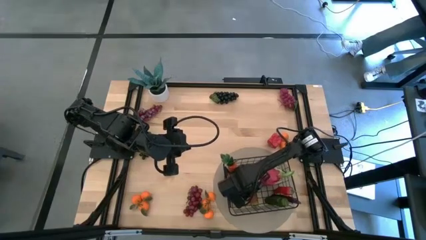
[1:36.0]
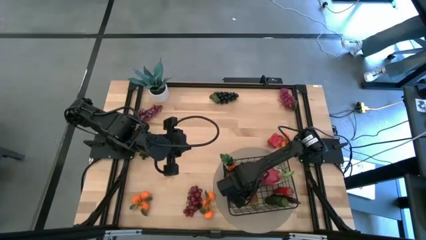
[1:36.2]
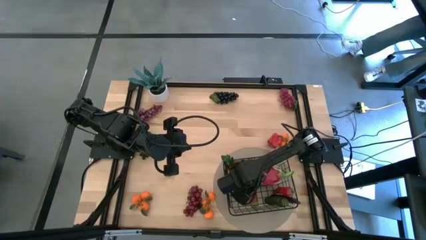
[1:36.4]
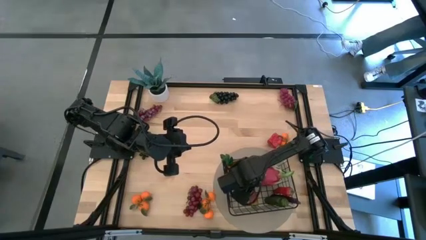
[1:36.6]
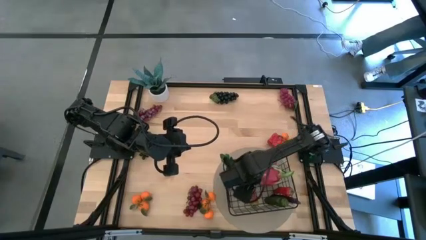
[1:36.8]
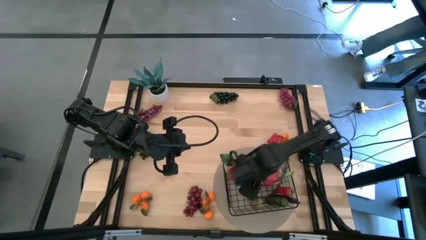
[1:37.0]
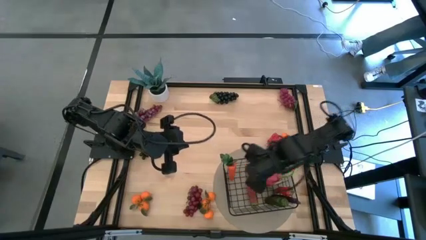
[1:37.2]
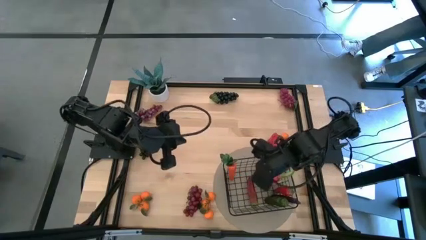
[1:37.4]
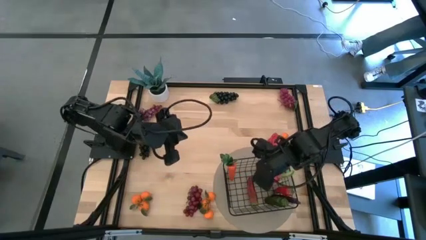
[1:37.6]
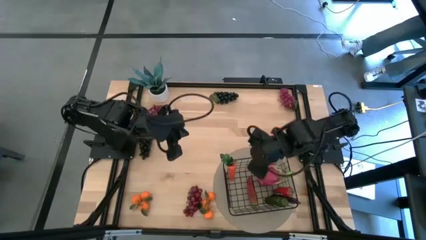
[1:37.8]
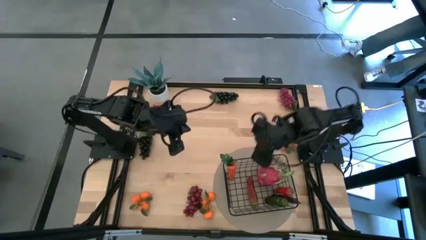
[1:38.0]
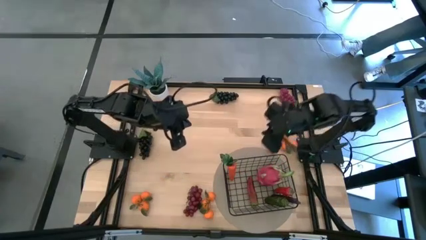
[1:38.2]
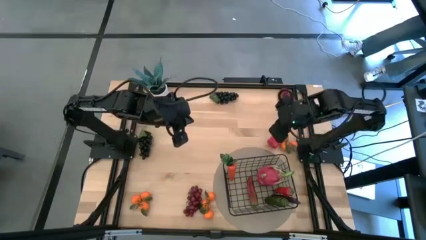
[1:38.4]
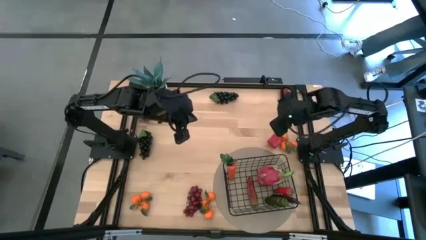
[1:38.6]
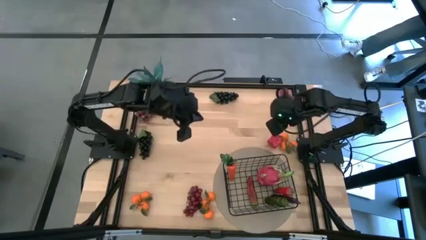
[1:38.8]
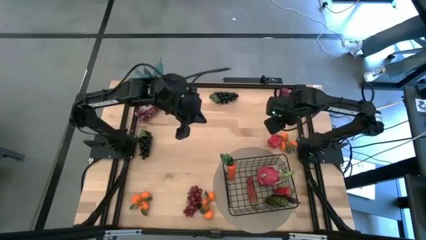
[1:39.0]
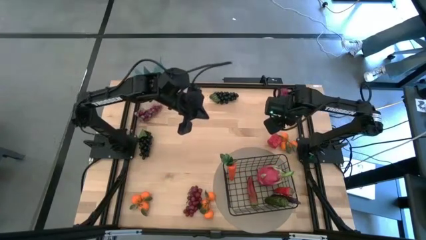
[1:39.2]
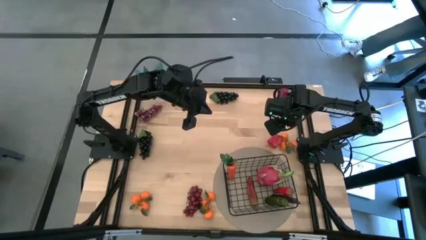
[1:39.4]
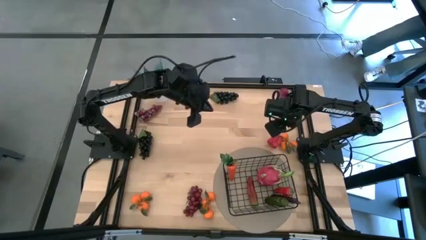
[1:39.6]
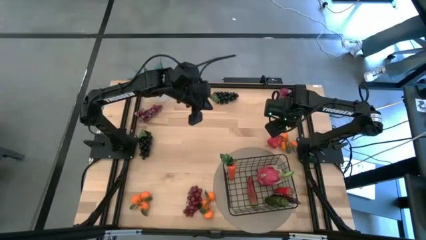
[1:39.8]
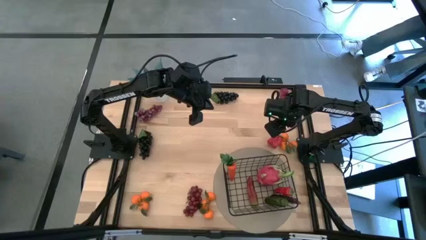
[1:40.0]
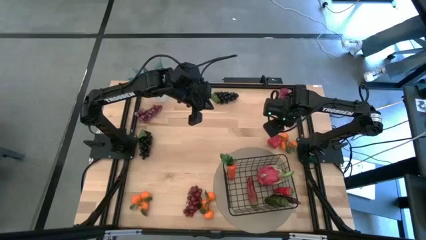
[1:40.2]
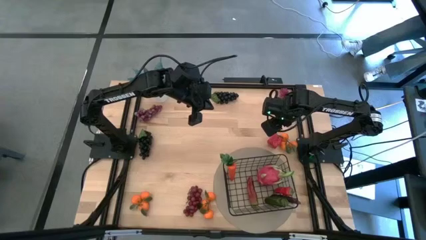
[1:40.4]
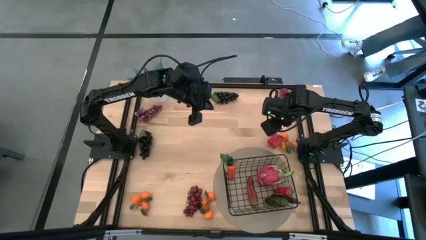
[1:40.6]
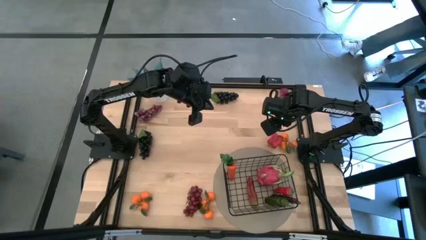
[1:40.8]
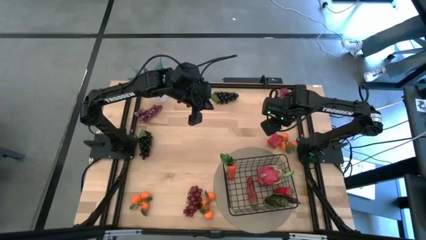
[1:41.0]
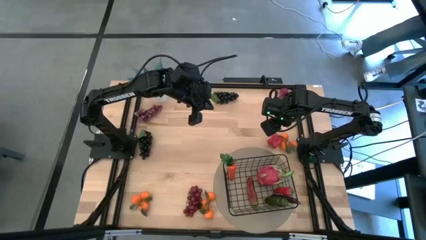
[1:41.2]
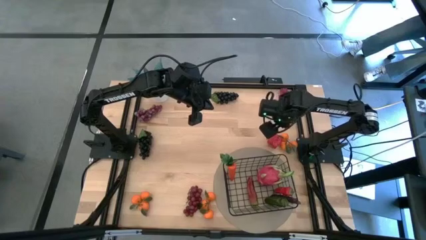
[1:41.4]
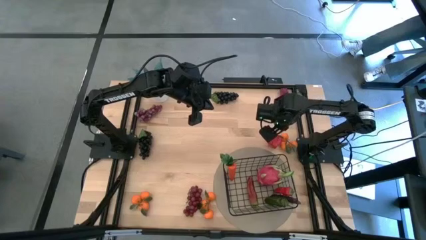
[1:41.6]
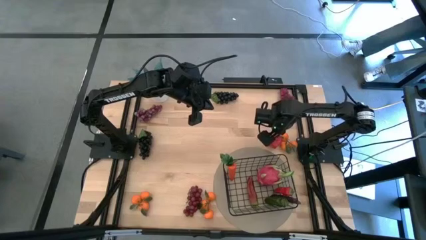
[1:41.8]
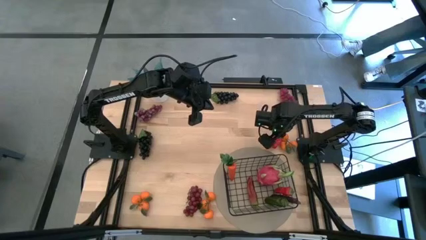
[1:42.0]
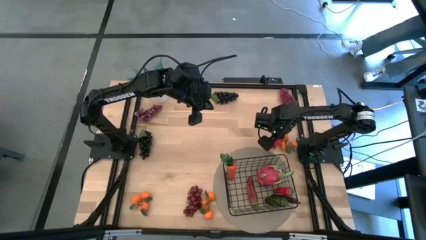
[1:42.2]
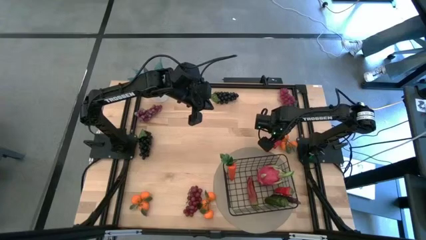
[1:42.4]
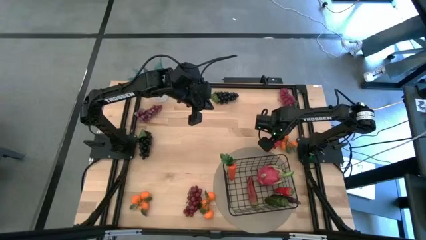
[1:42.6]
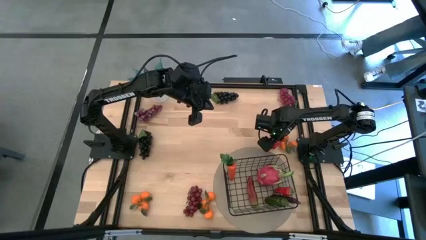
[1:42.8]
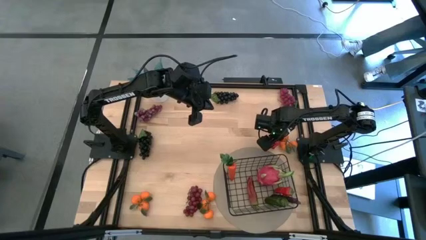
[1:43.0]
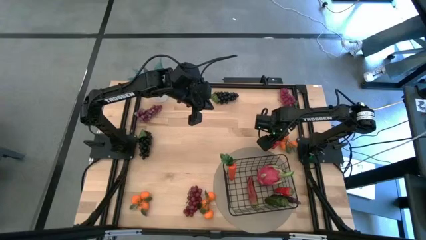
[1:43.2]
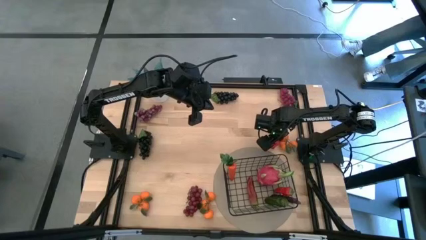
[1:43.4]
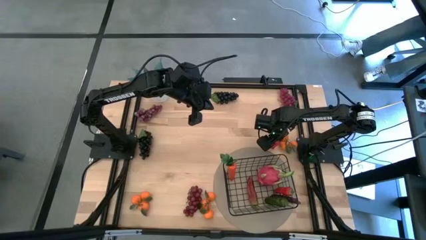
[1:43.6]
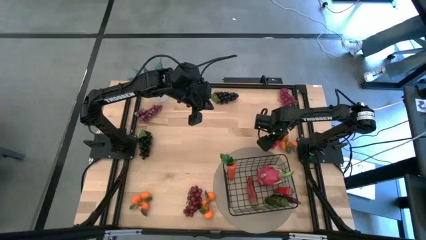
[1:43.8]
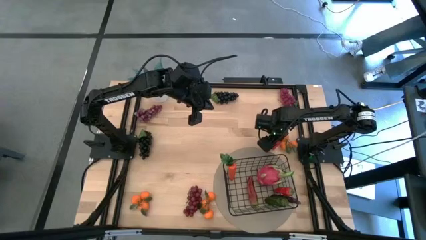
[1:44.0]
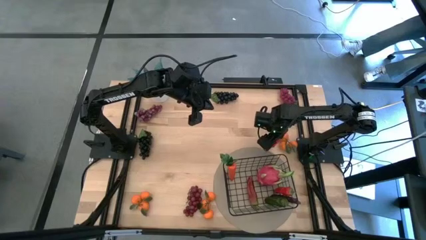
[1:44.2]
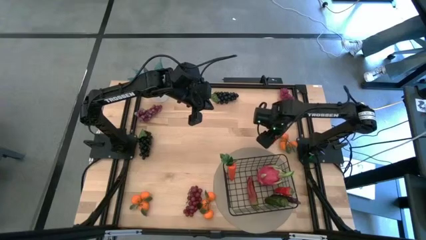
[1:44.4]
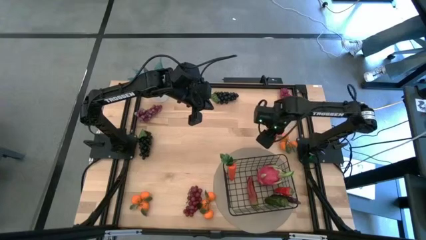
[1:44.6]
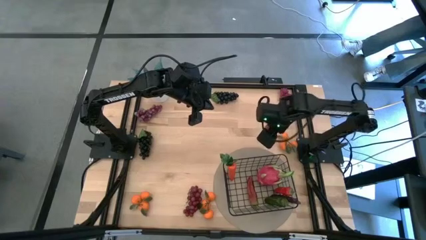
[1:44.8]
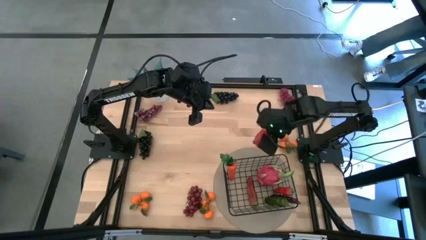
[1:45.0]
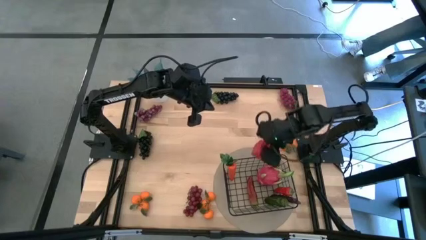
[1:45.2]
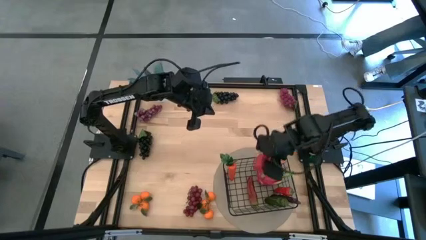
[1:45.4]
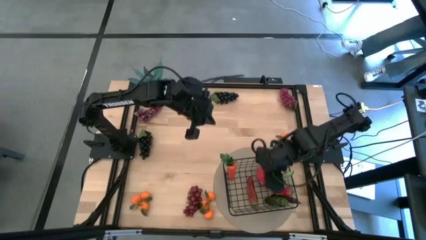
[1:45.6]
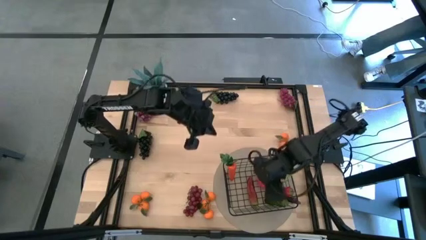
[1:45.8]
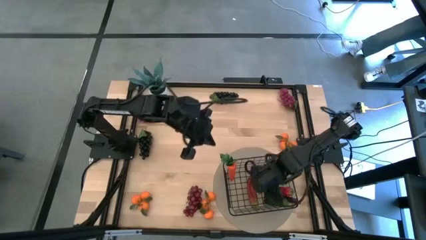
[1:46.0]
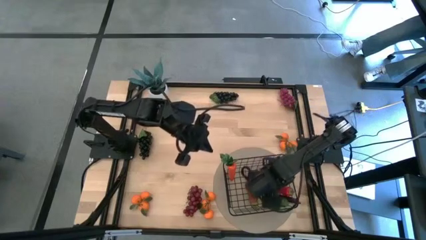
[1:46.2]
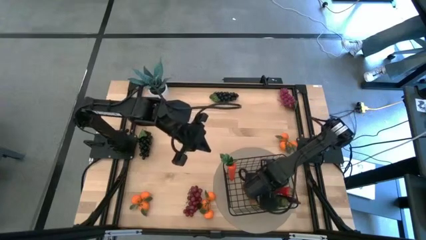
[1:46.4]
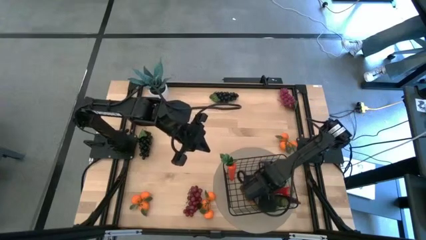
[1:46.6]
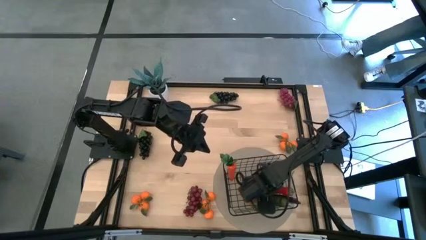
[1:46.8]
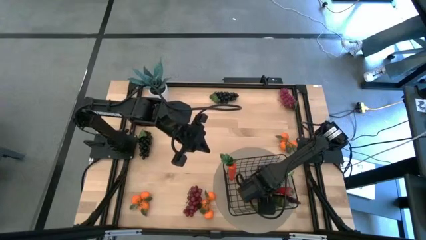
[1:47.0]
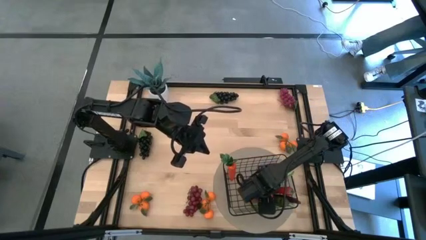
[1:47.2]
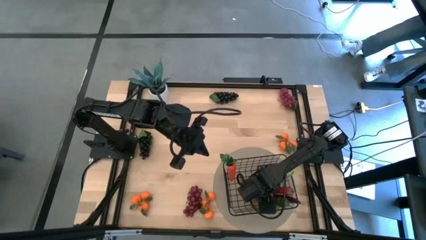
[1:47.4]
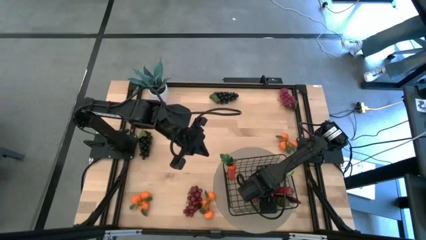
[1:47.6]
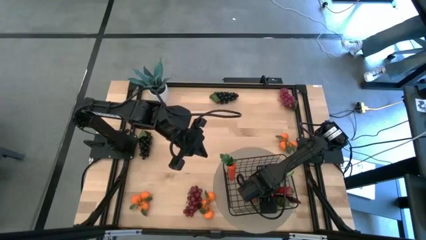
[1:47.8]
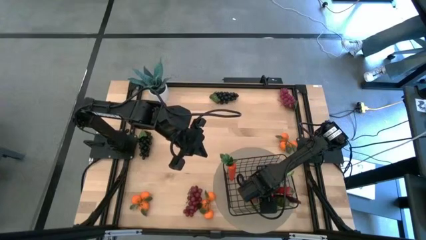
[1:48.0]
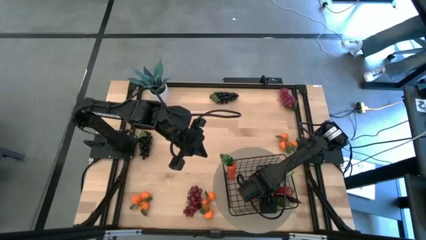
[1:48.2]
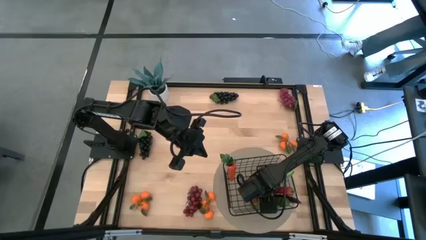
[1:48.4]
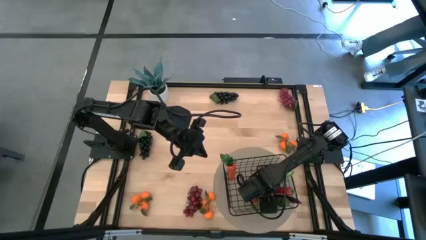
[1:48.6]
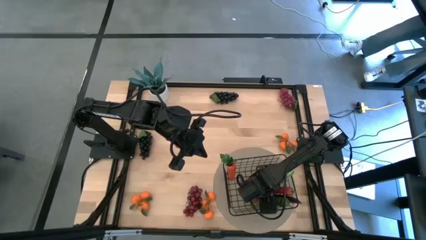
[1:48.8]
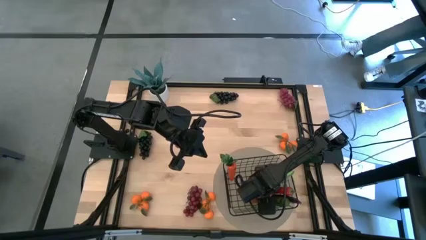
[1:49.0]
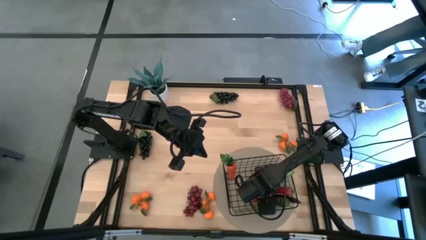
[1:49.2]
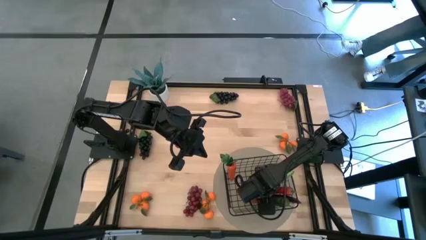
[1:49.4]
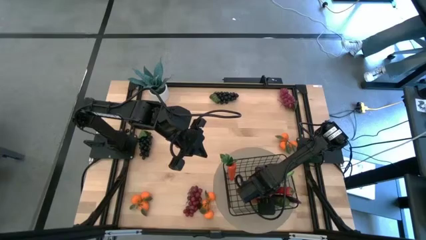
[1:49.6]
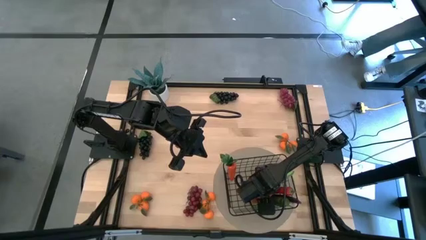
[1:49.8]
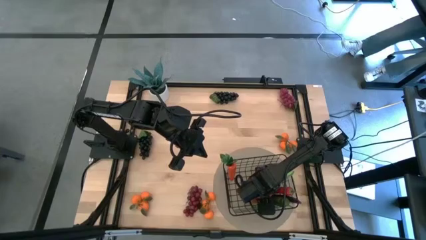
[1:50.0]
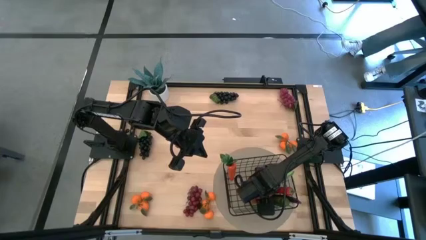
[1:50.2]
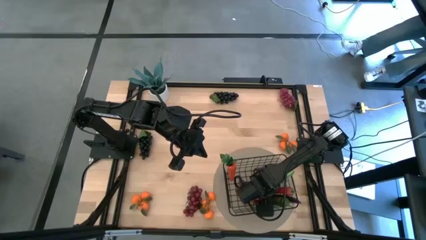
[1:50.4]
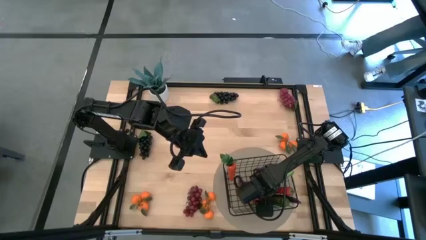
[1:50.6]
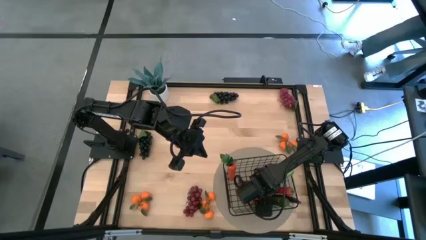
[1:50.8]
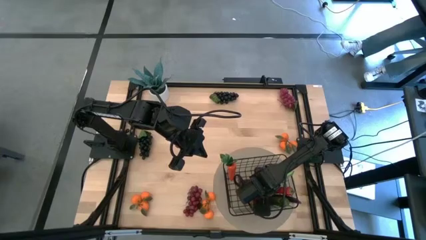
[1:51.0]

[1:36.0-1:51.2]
Task: Build produce basket
Put the bell pepper into the wire basket
